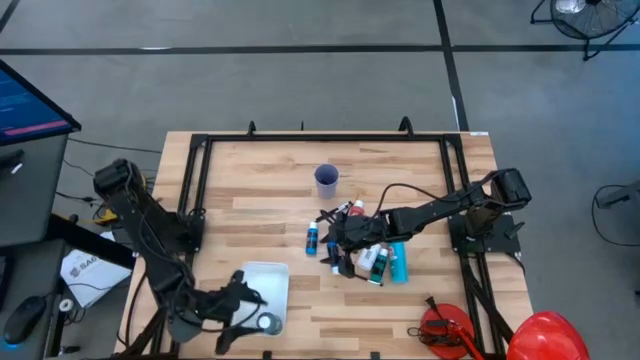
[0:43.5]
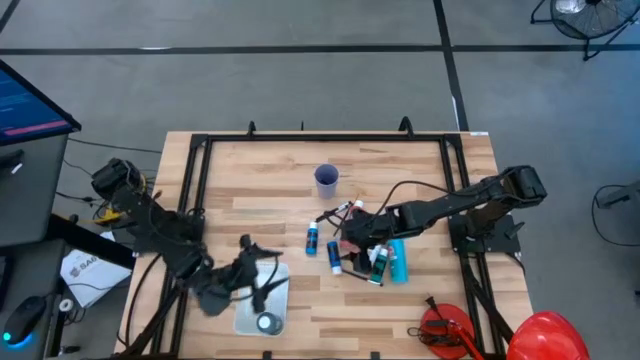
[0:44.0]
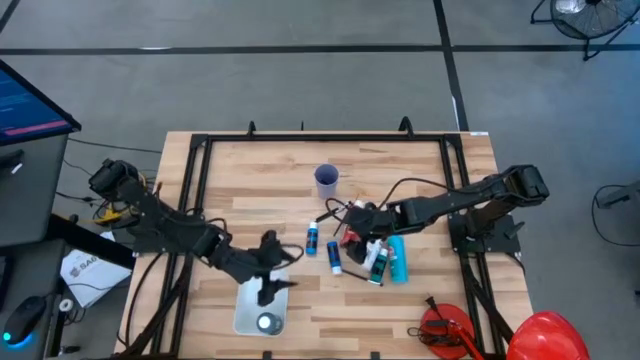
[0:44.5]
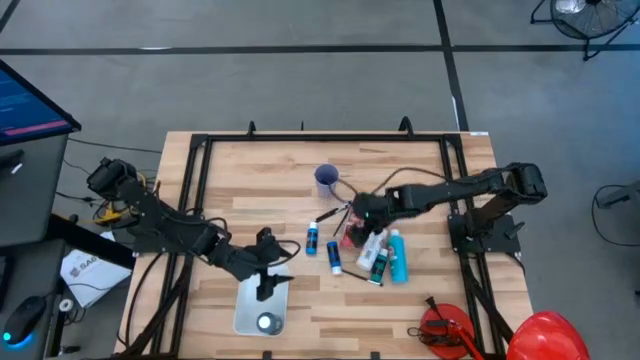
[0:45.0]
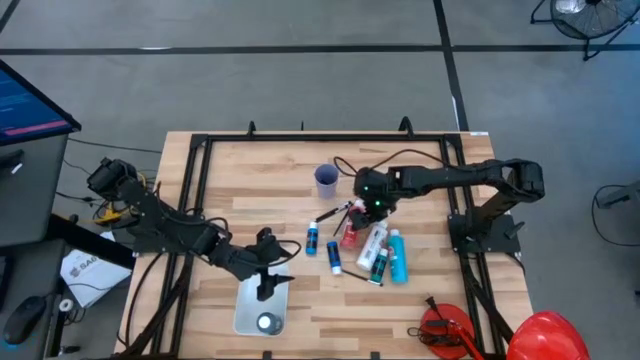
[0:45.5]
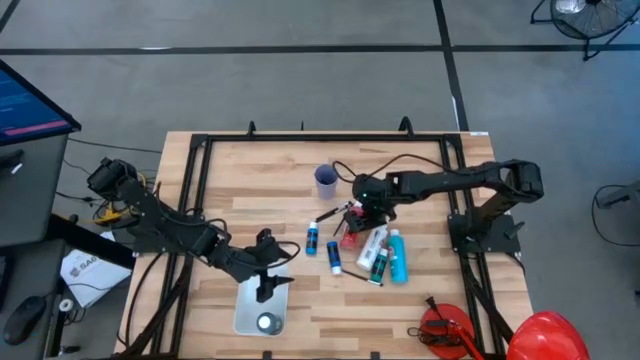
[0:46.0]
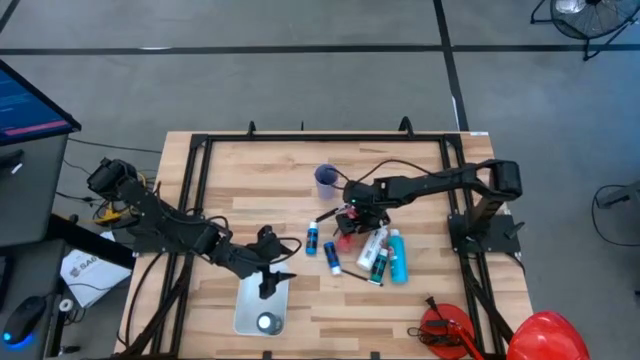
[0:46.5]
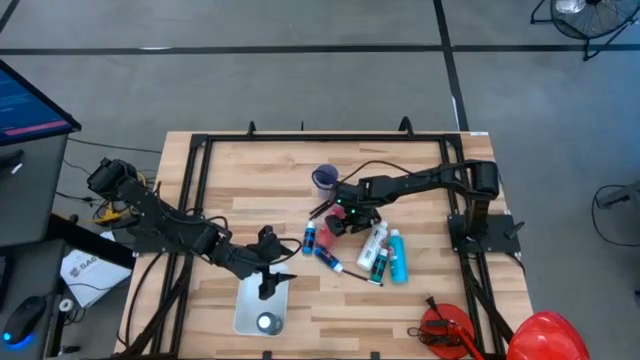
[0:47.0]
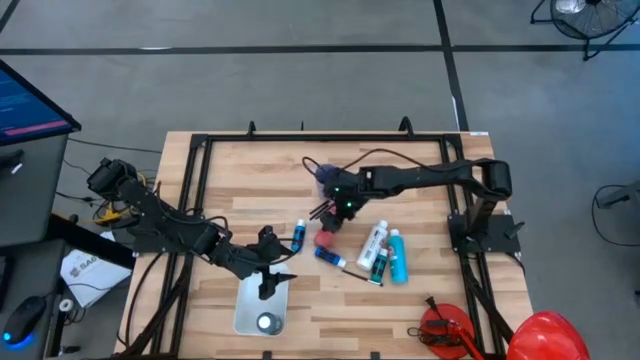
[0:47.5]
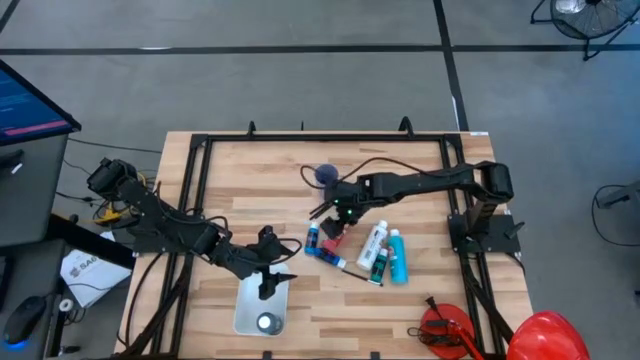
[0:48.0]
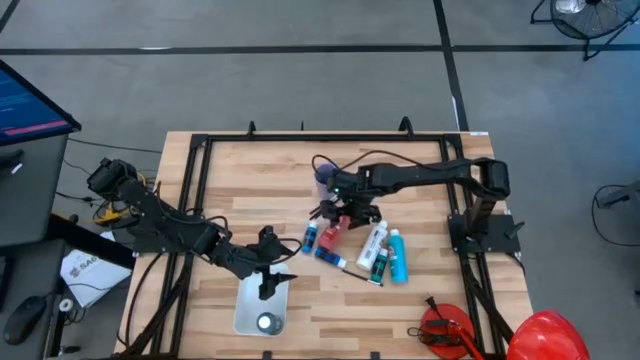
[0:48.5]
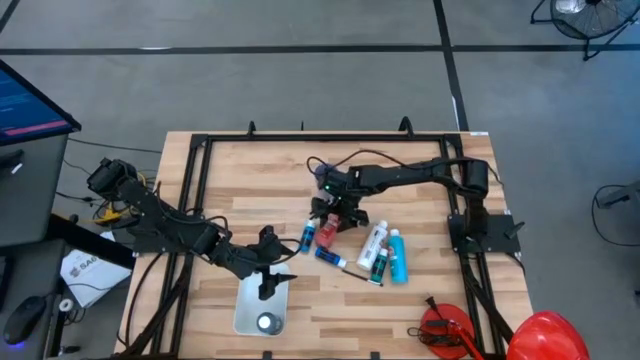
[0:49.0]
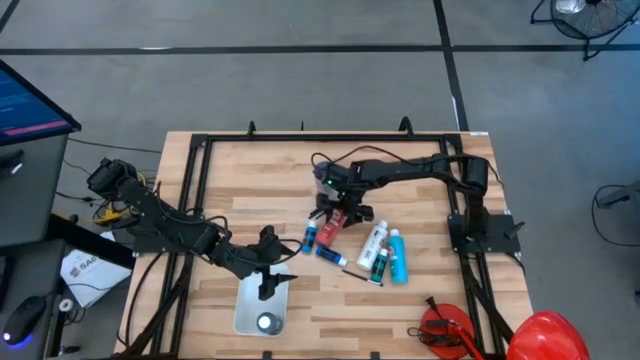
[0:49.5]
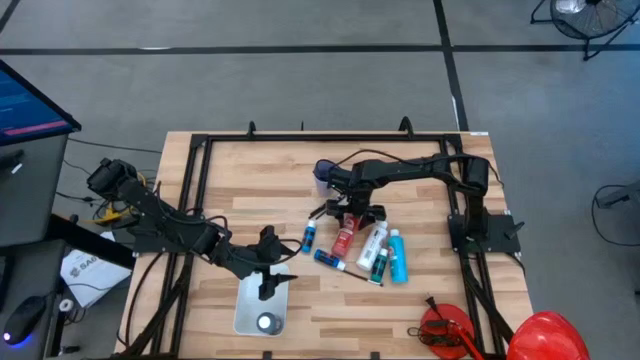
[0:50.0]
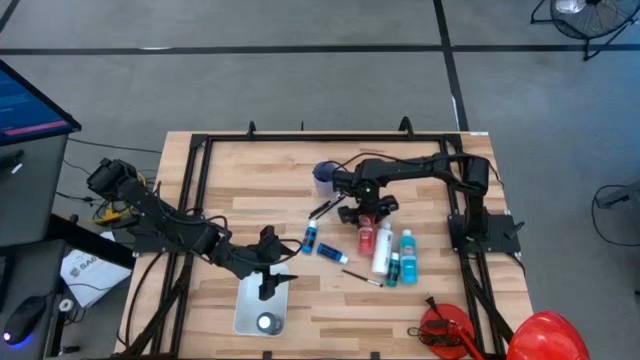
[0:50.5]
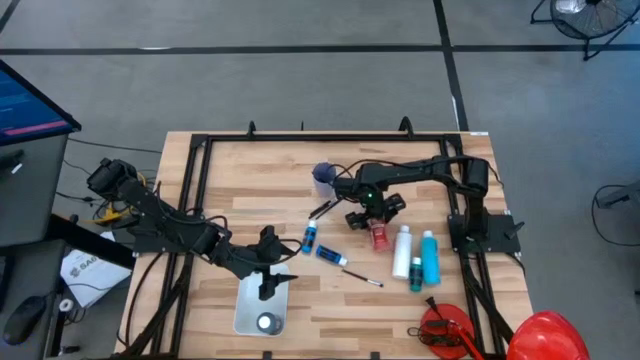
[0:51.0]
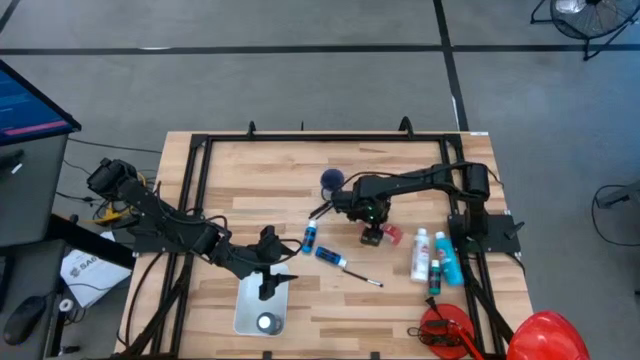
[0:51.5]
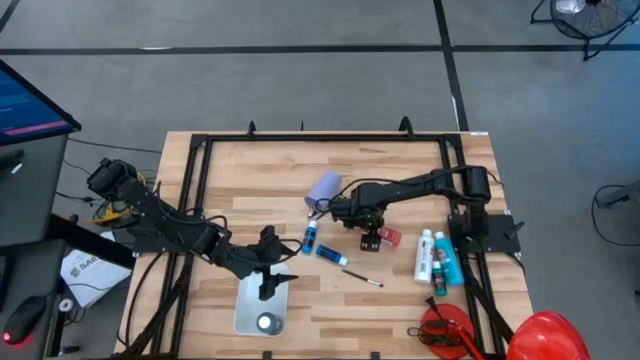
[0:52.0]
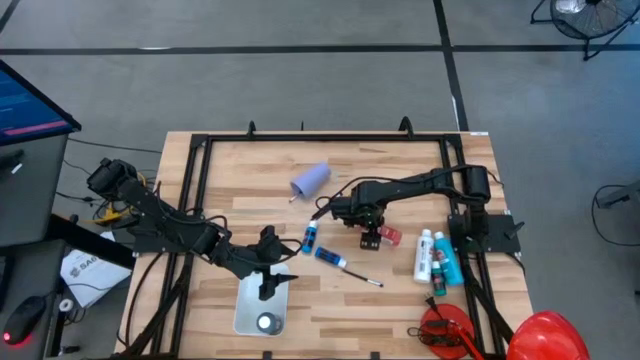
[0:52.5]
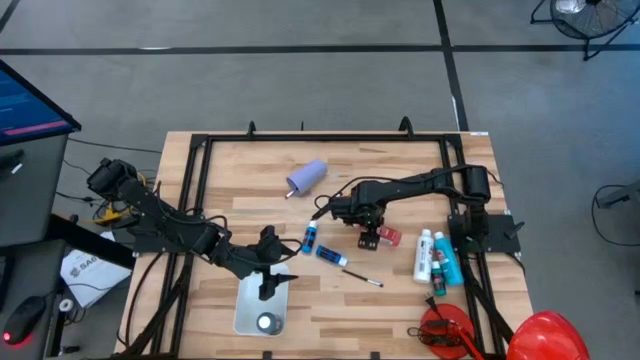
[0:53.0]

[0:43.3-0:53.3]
Task: Pick & Place Paint Supplies
Put the red paint bottle into the white bin

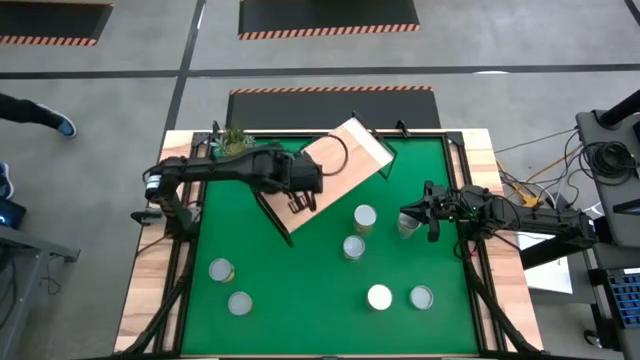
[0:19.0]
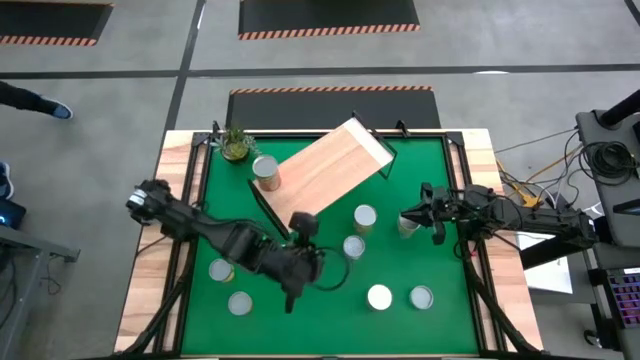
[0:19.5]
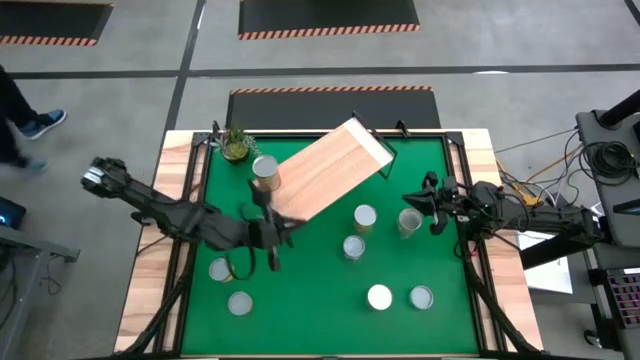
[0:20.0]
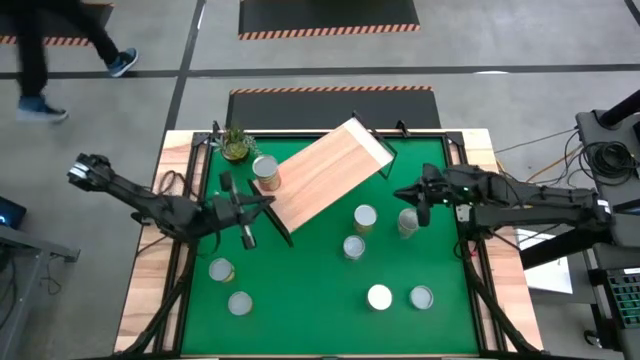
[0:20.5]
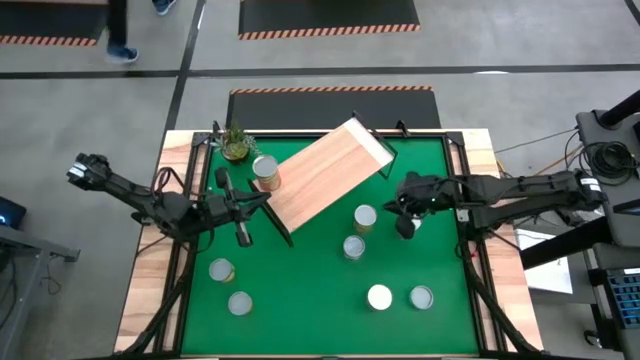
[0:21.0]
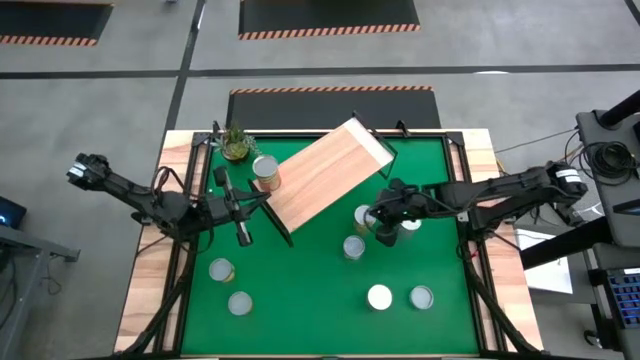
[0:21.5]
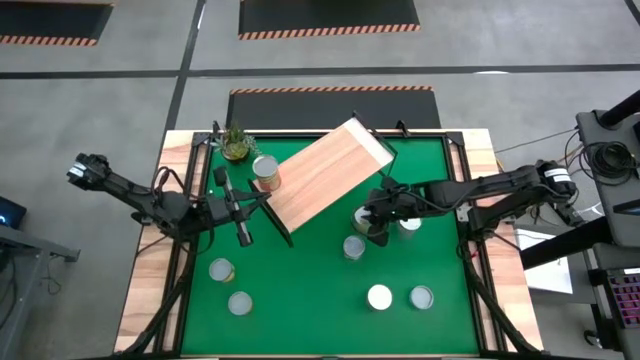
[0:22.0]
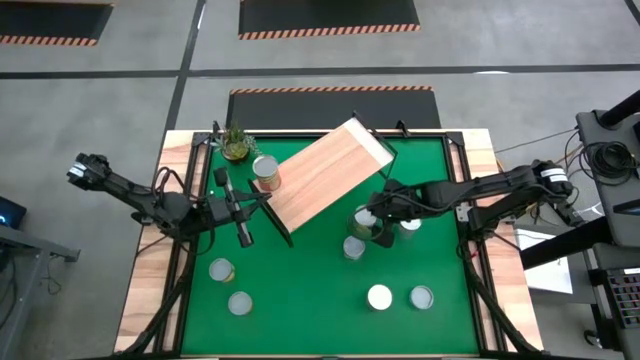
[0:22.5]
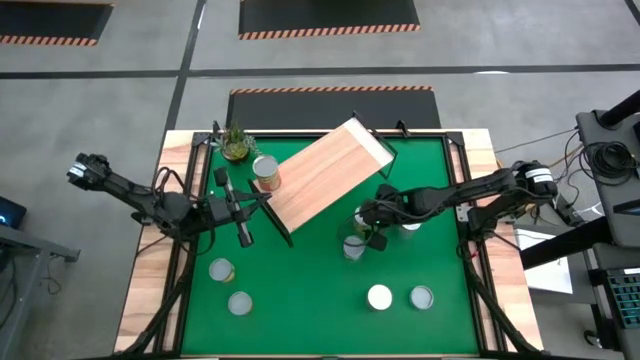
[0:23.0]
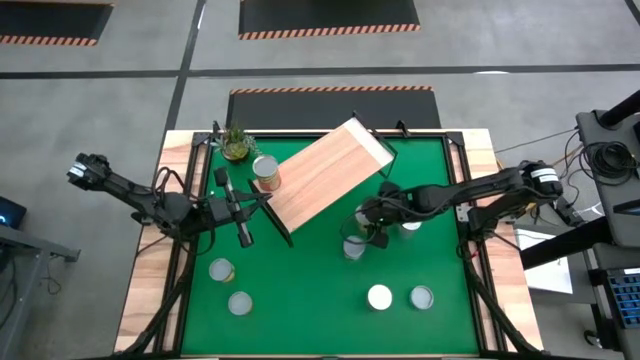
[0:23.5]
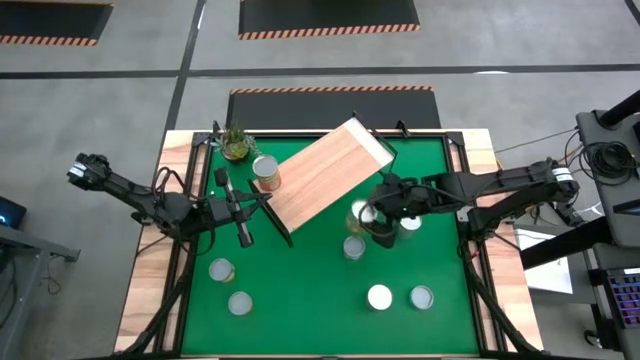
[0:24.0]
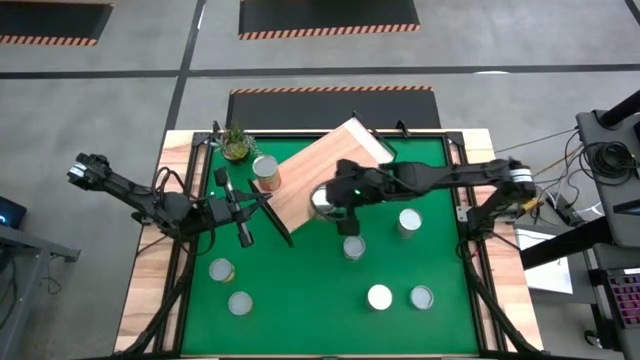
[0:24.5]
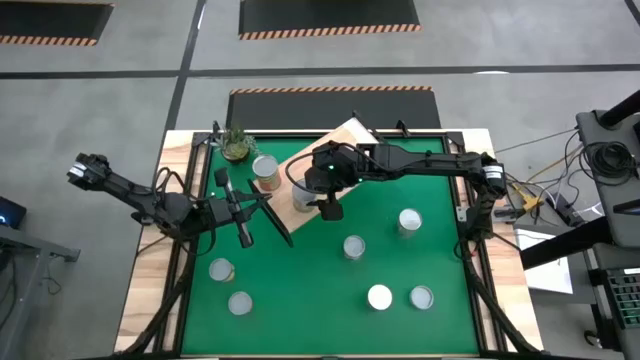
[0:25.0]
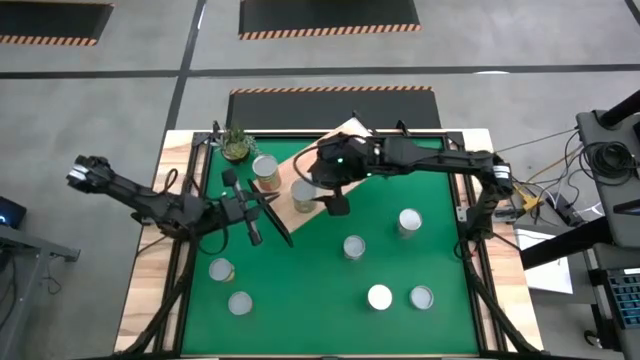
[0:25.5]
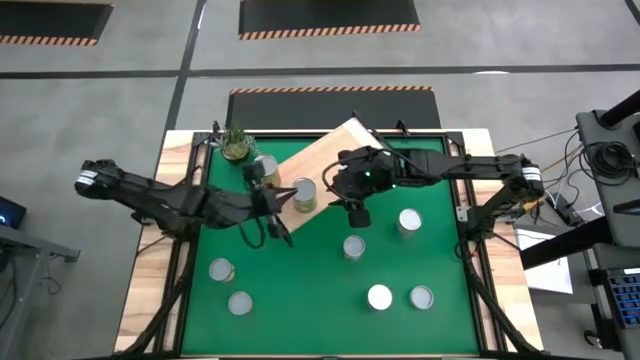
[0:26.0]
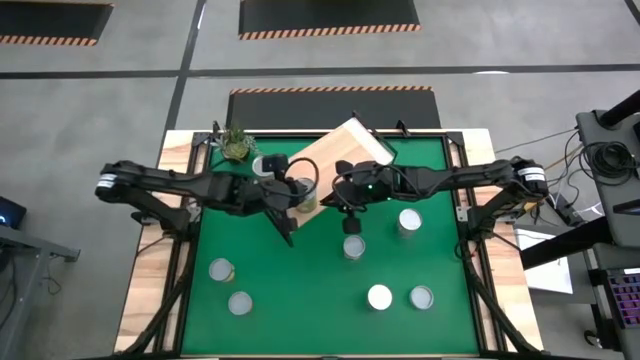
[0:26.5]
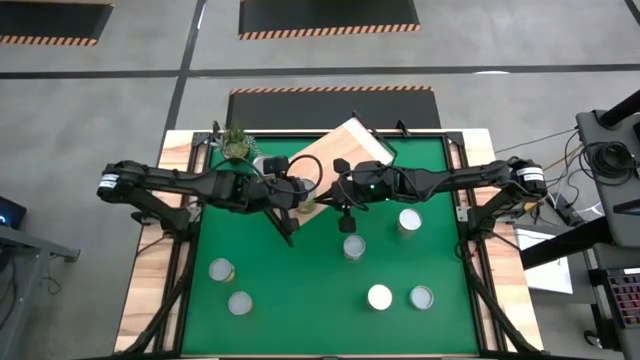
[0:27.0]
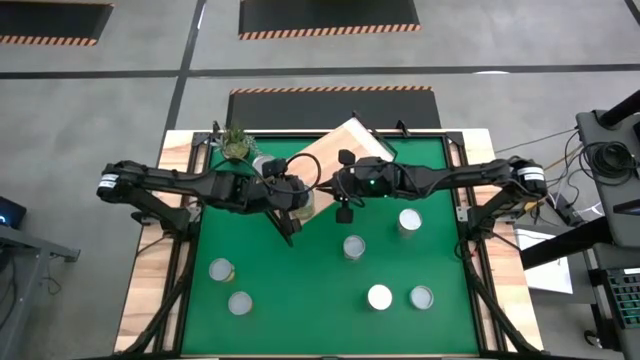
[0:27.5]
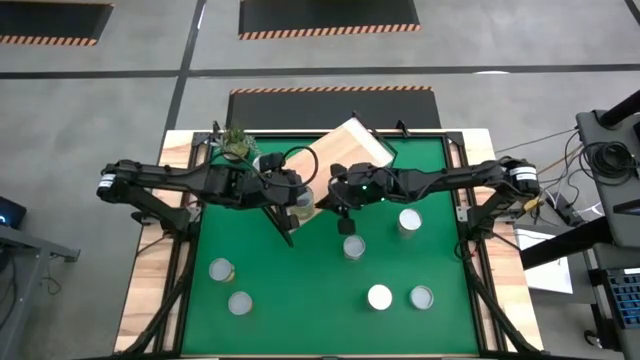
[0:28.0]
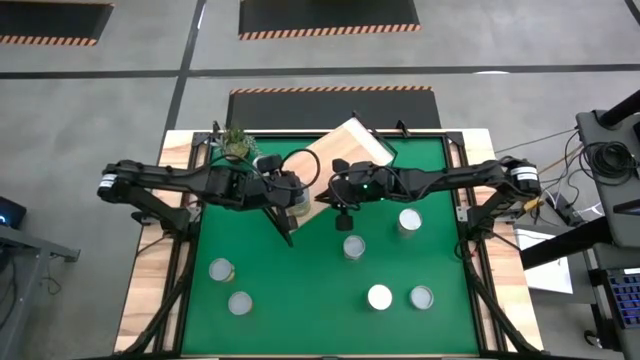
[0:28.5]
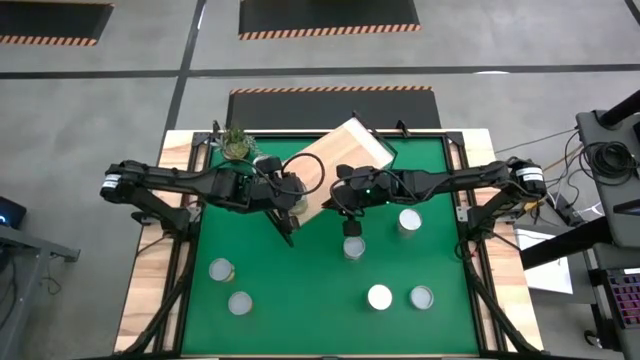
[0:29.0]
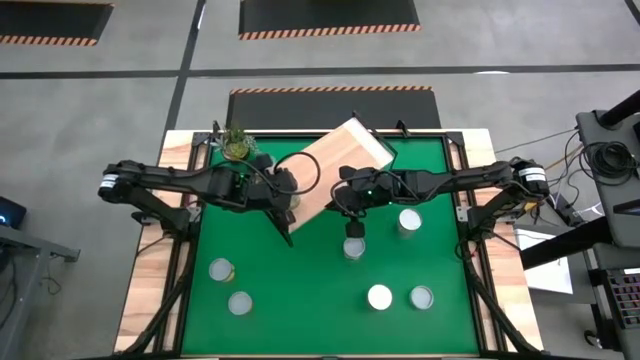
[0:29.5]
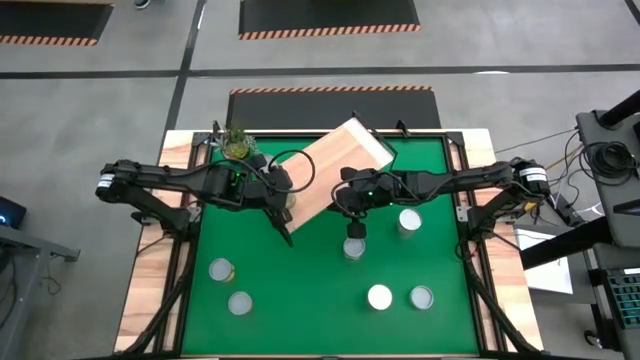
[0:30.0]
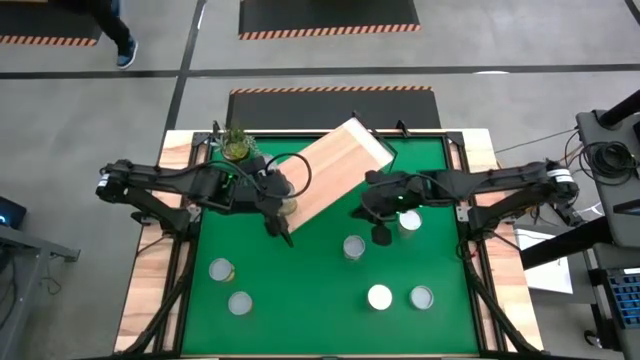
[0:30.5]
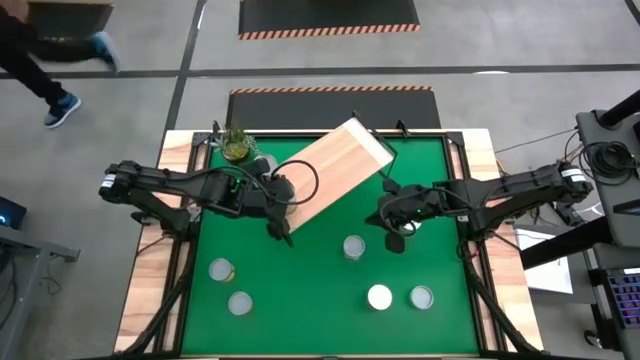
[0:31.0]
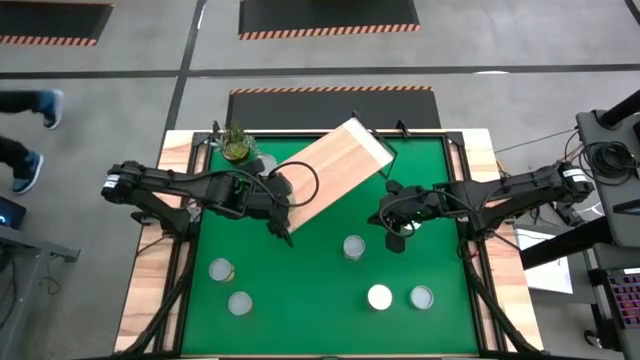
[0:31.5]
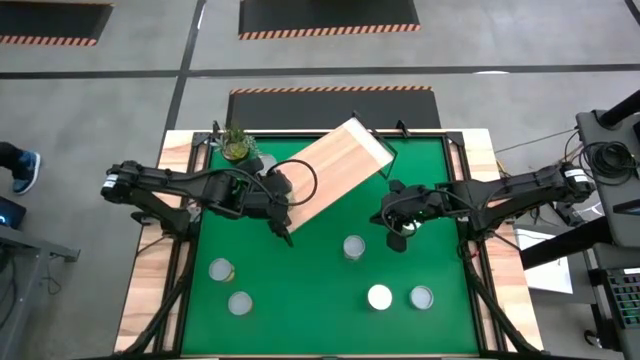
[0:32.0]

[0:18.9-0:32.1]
Task: Pick and place cans onto a shelf
Put the light green can on the shelf
